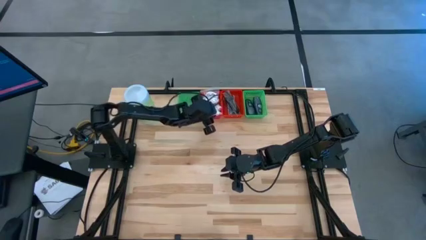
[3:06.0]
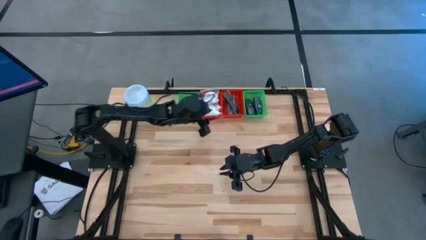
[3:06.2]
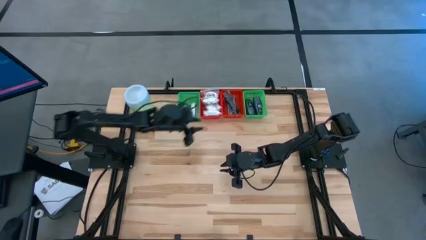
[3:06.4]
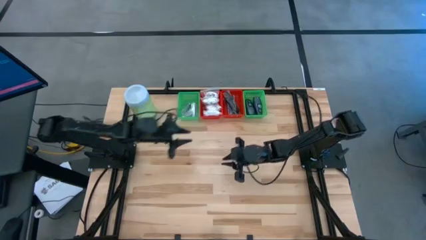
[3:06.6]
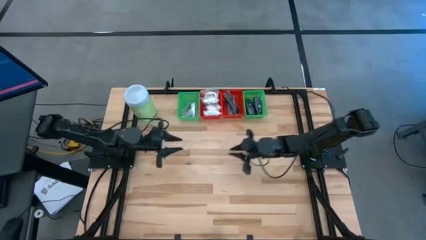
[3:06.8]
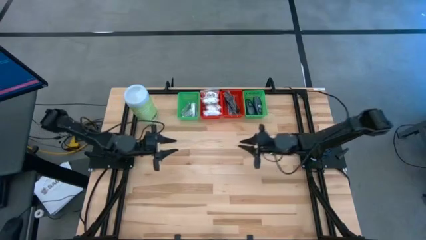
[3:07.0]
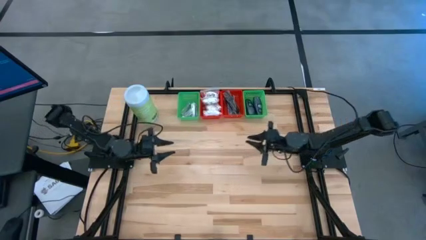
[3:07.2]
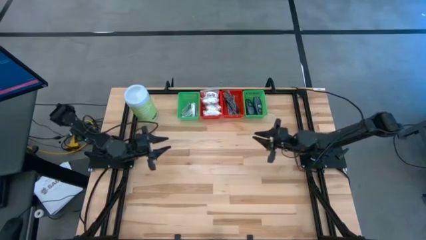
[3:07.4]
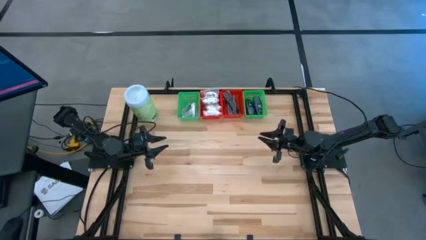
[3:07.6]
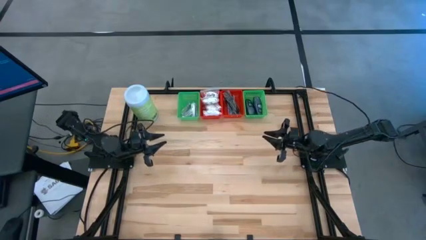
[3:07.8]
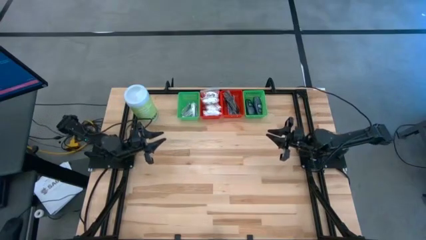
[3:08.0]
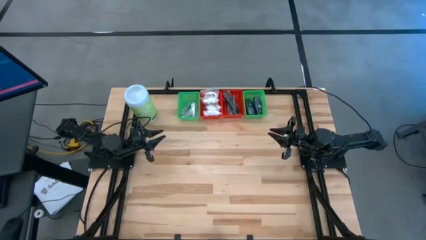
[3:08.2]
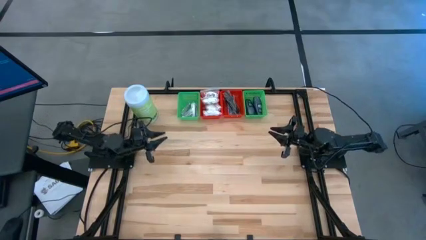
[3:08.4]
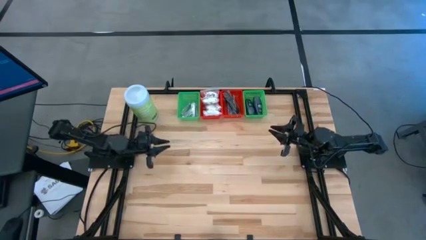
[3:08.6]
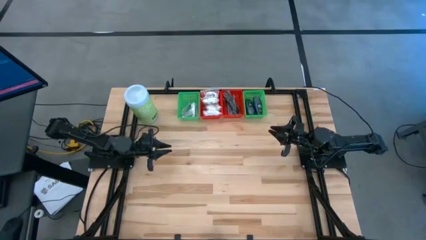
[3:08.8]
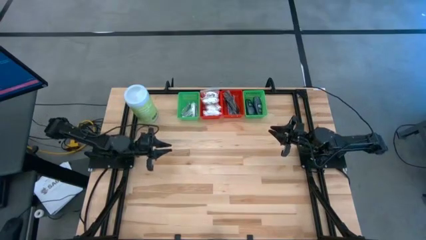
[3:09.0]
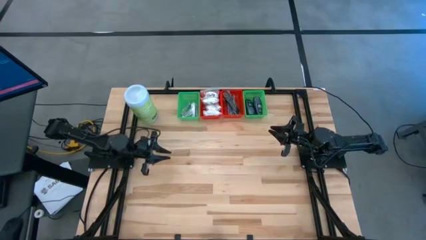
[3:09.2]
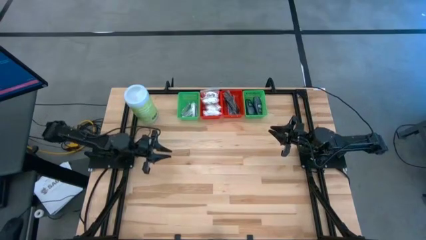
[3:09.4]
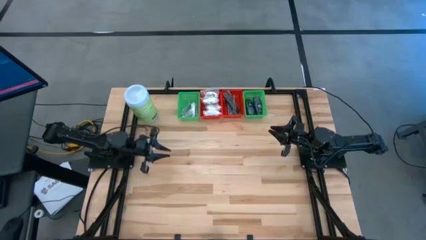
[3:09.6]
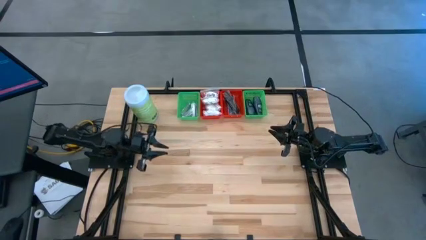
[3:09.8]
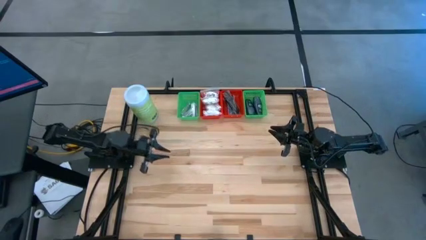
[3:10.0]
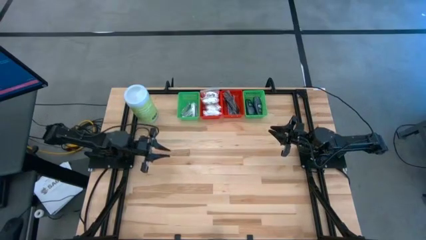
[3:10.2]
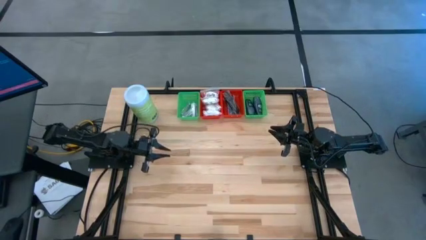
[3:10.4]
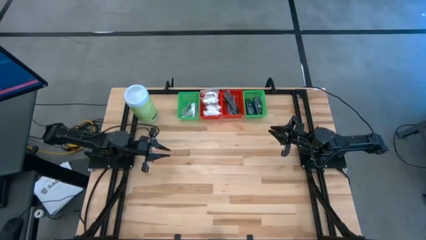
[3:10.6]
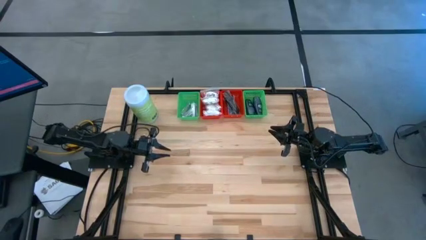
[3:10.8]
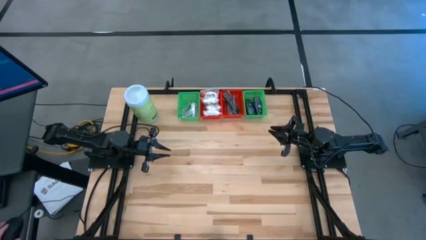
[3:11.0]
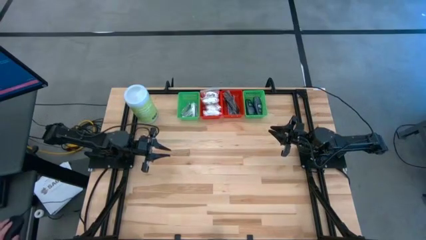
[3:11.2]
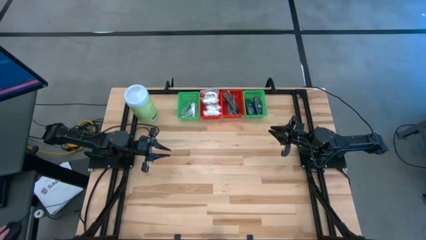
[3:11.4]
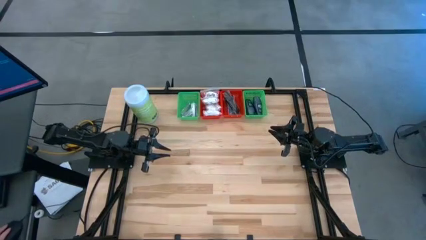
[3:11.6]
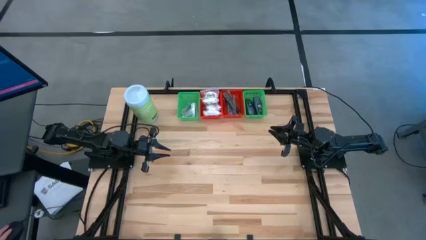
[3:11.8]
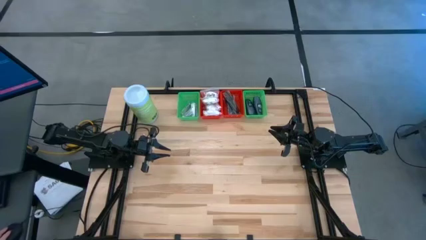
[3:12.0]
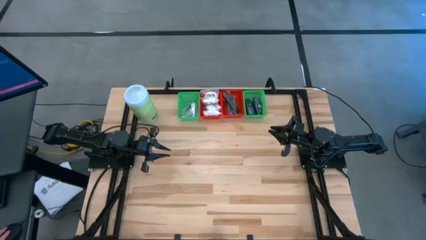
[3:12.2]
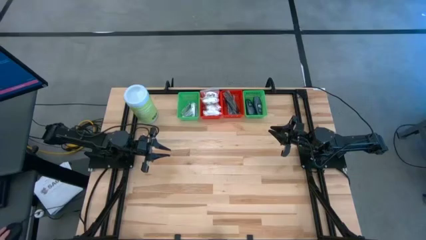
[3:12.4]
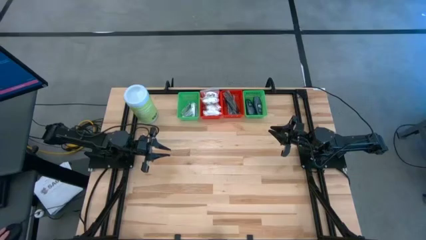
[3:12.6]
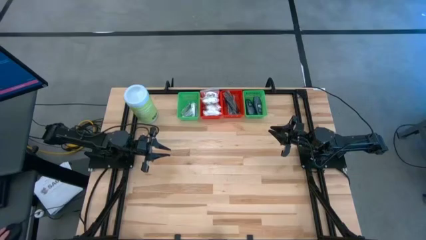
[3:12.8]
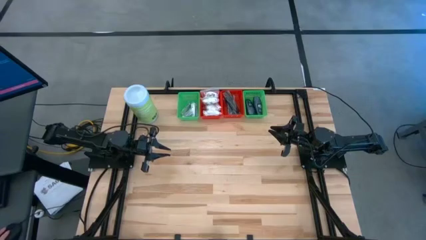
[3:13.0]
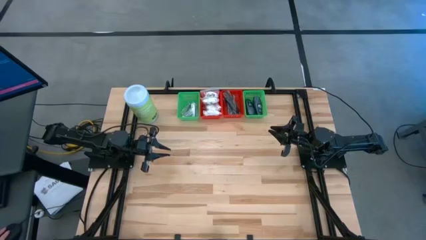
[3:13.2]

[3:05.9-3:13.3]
Task: Pick & Place Travel size toiletries
Return to Home Position
